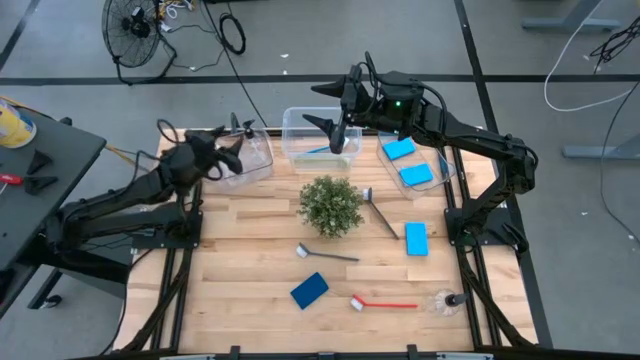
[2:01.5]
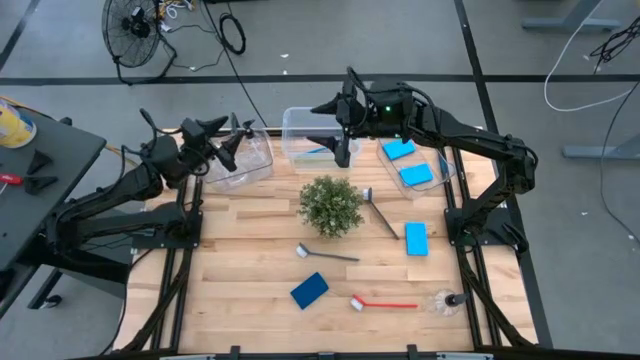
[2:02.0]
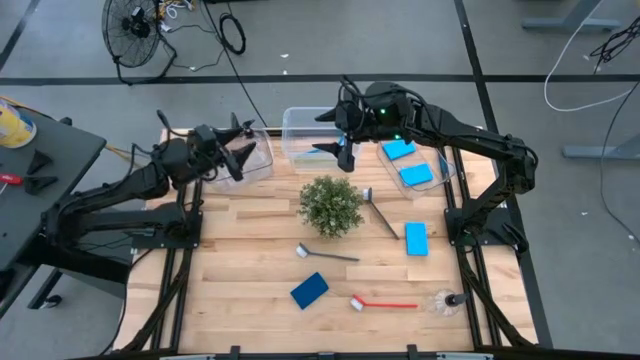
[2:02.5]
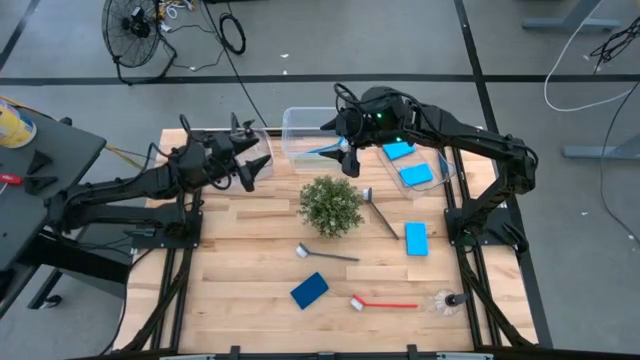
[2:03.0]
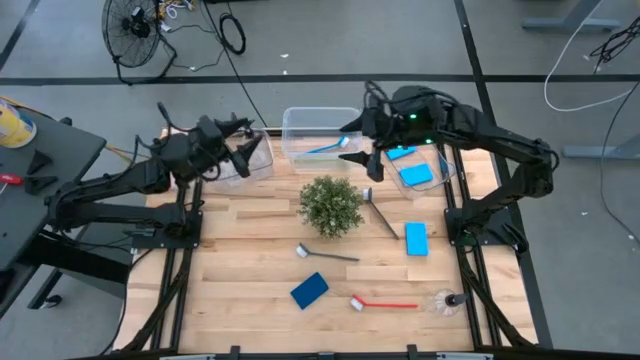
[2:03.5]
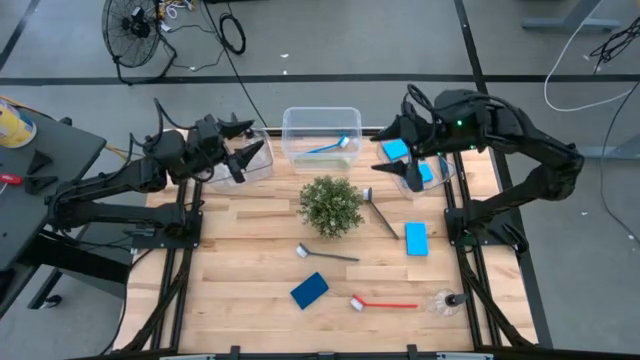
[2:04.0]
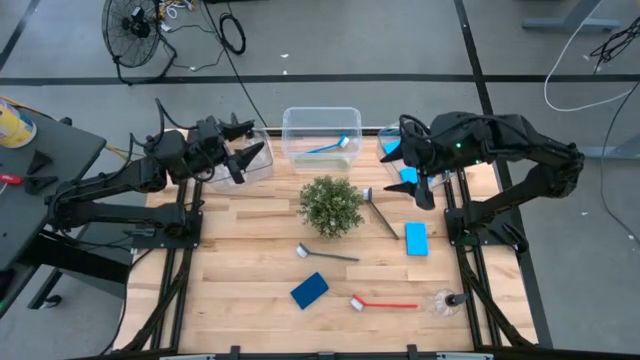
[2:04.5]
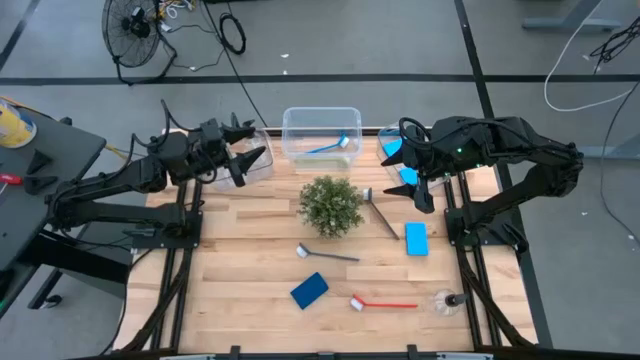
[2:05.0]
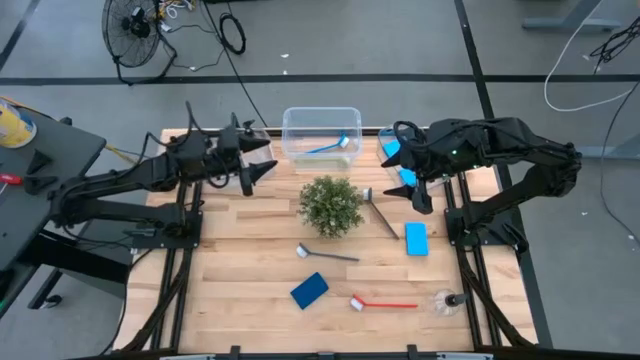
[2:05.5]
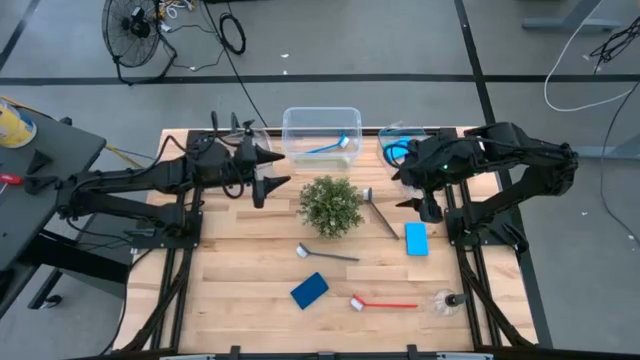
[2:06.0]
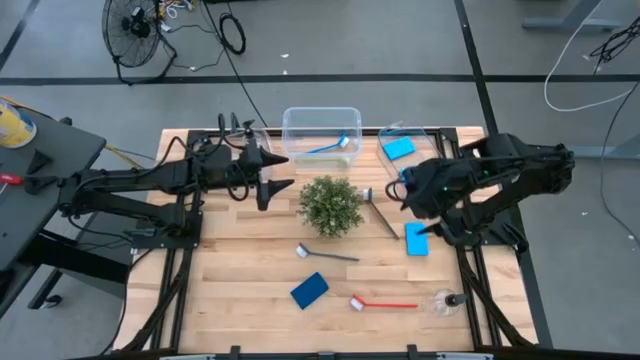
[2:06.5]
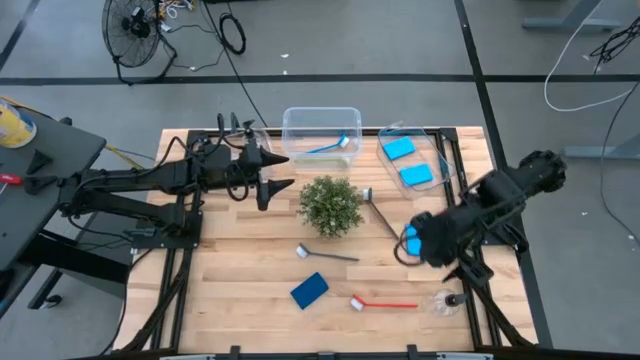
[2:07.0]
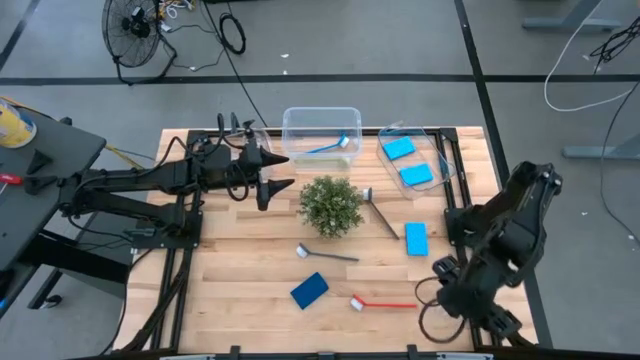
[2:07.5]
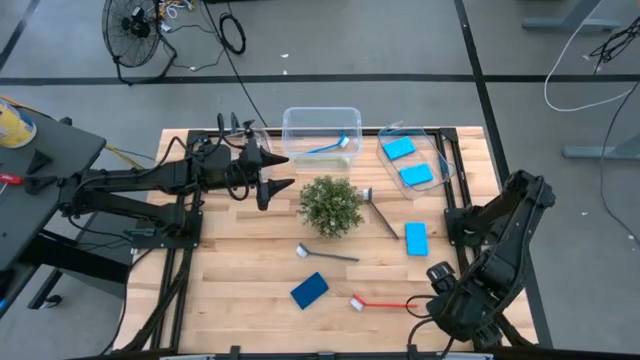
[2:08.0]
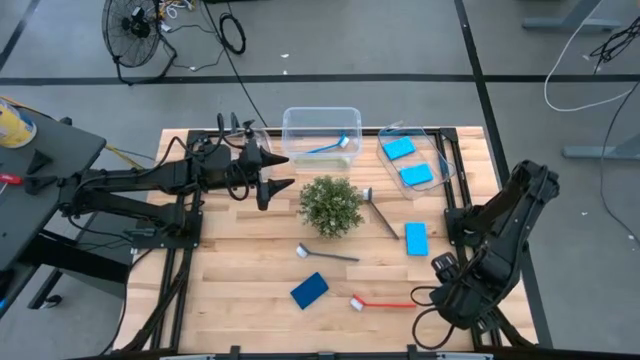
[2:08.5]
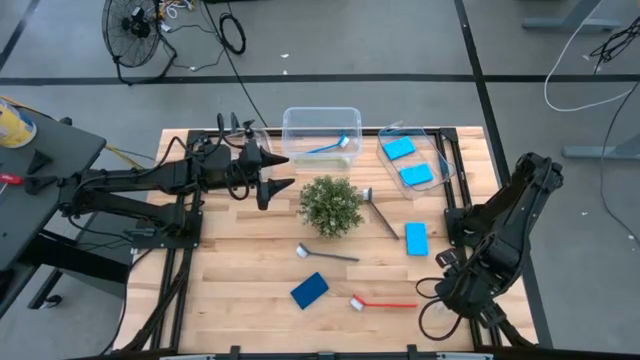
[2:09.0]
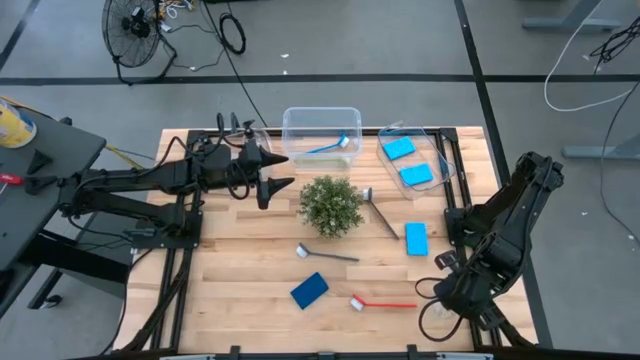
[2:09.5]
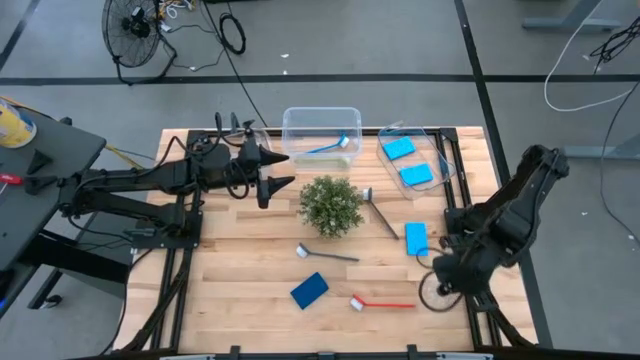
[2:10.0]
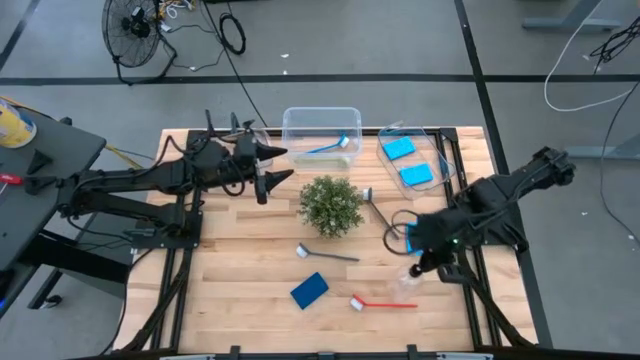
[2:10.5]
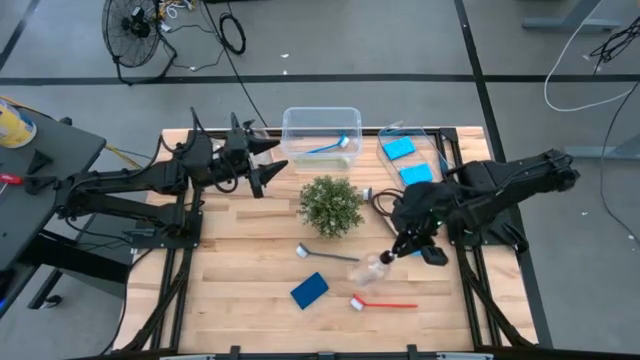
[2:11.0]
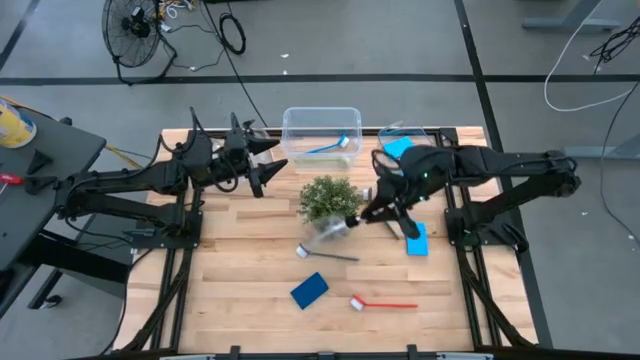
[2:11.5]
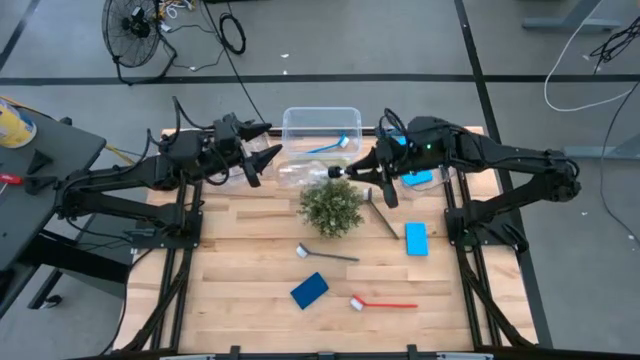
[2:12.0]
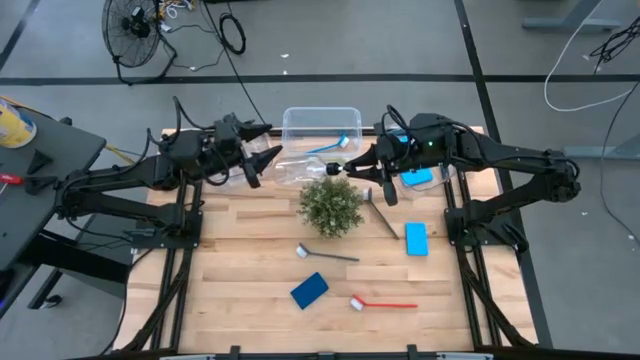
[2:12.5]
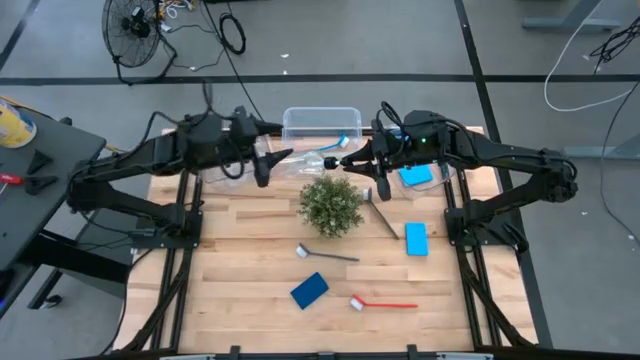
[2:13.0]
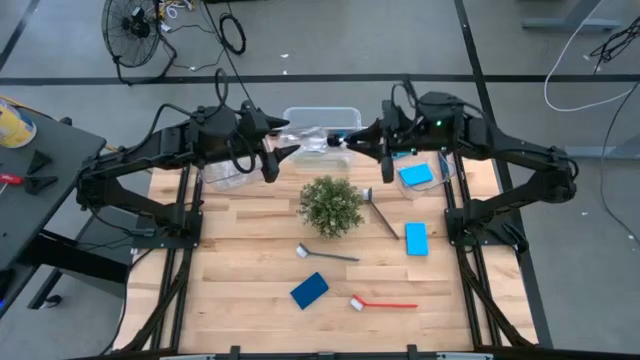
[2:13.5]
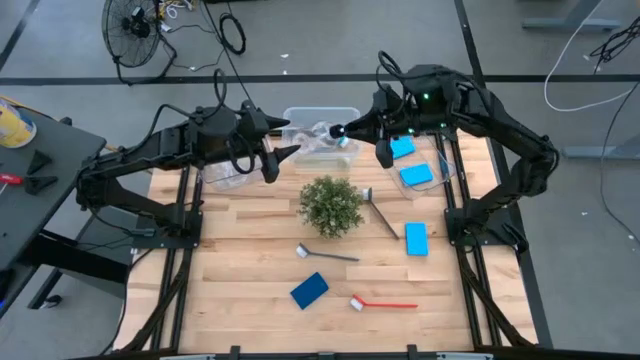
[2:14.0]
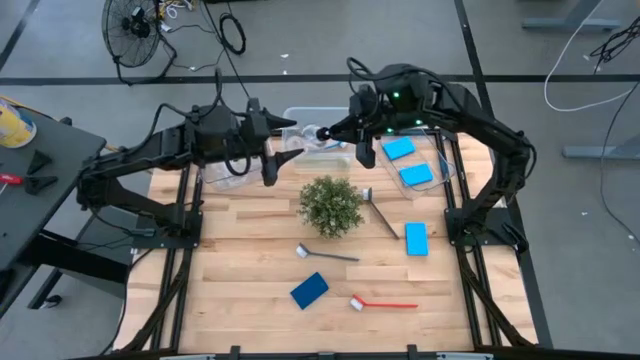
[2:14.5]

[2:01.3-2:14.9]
Task: Pick & Place Kitchen Sink Supplies
Put the transparent soap dispenser into the left transparent bin

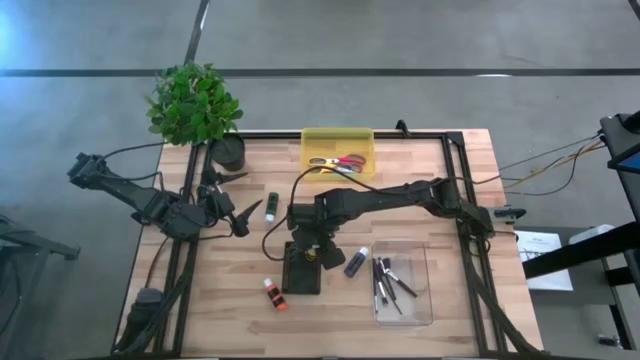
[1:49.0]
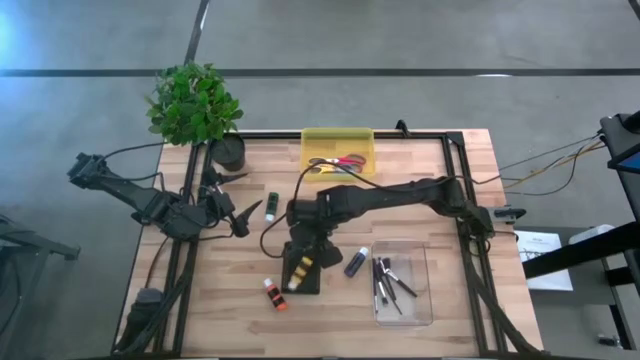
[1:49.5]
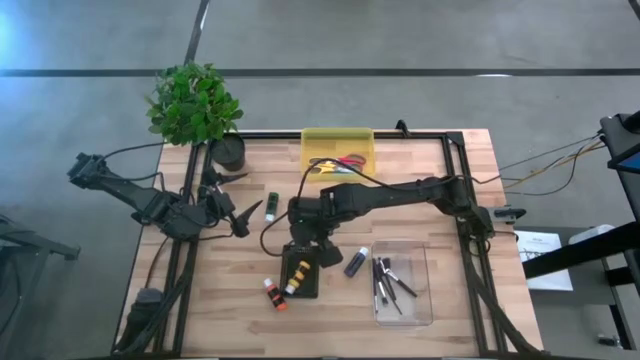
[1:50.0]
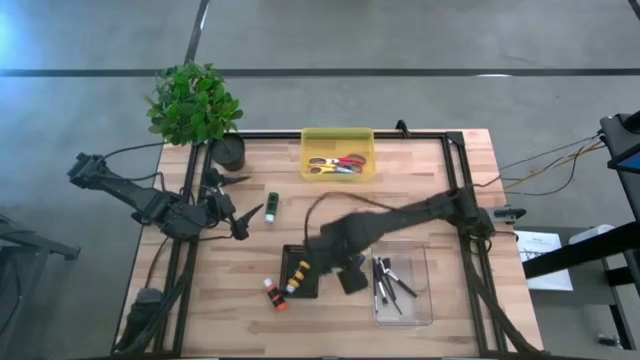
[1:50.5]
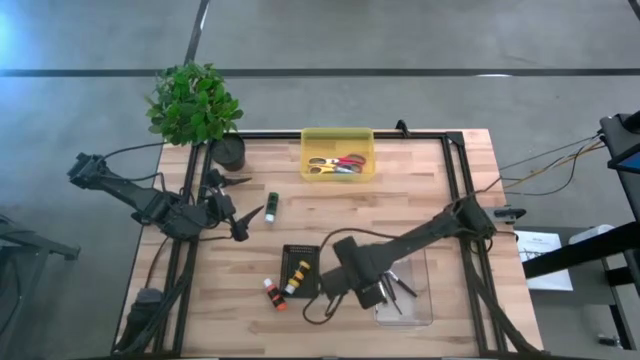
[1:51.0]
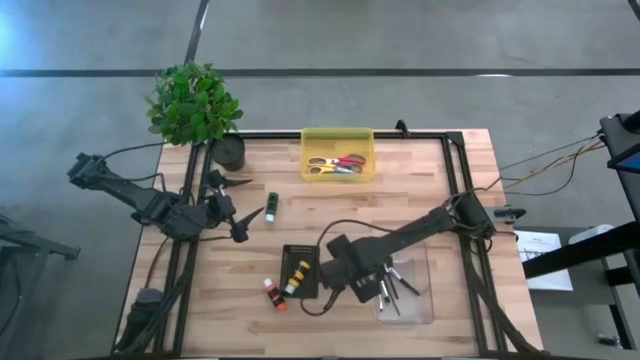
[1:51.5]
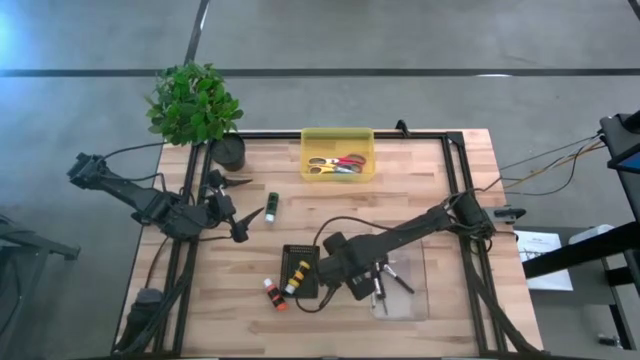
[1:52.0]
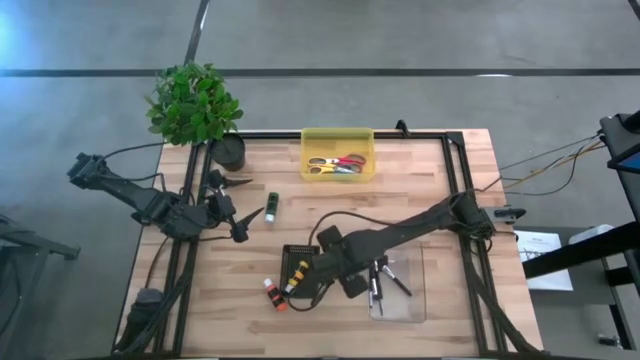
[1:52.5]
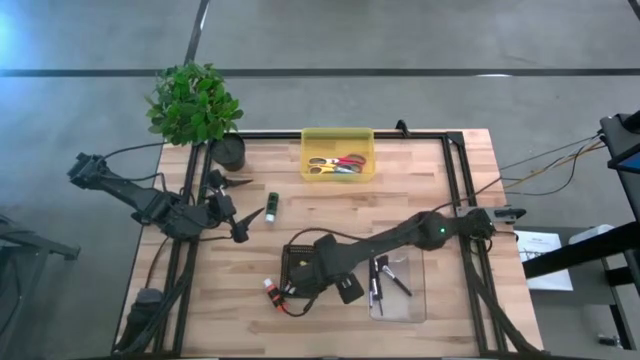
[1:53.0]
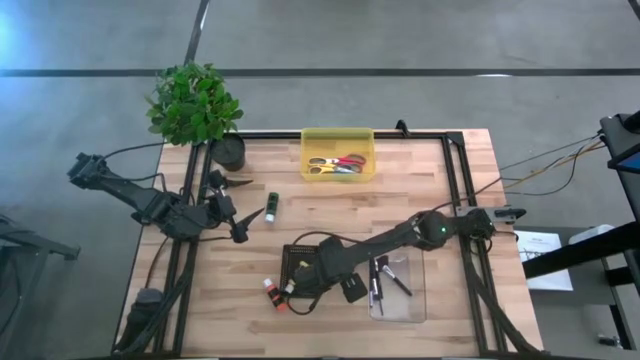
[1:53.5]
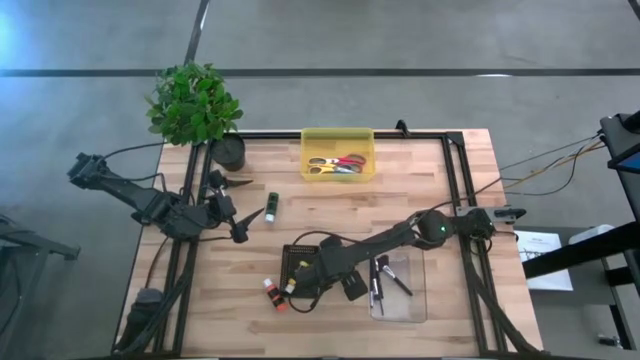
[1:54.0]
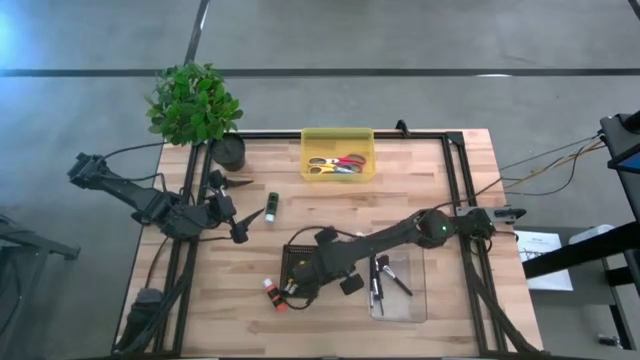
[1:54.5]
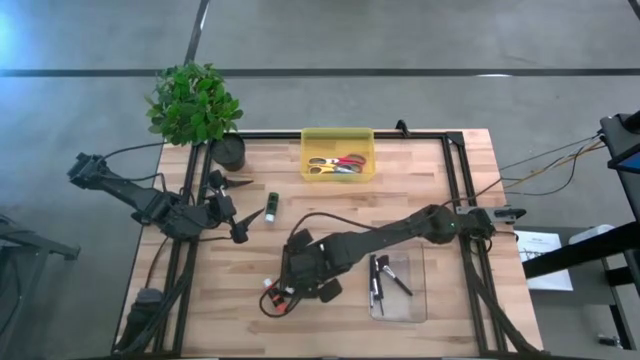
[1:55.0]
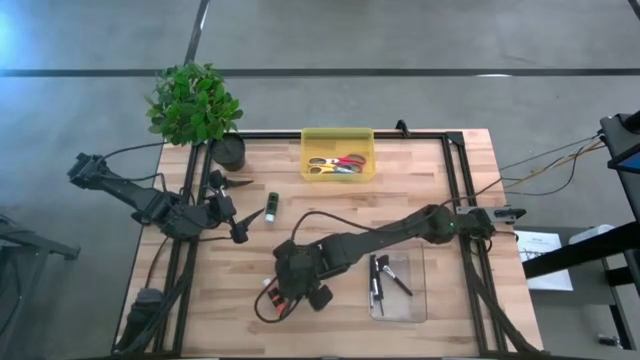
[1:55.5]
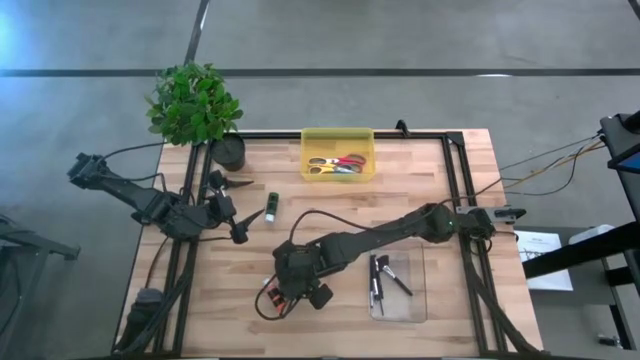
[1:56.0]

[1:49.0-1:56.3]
Task: Pick & Place Paint Supplies
Put the blue paint bottle into the black bin
